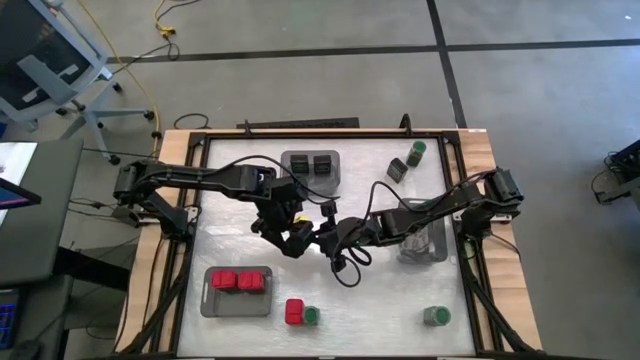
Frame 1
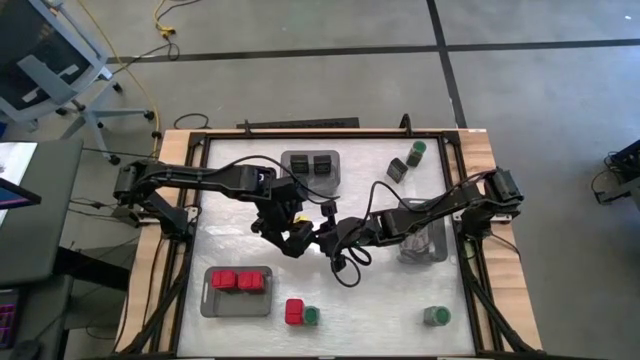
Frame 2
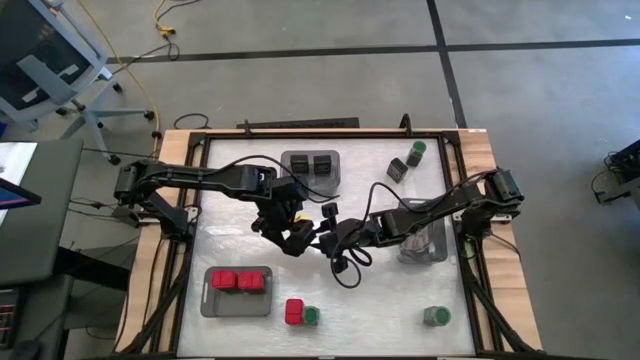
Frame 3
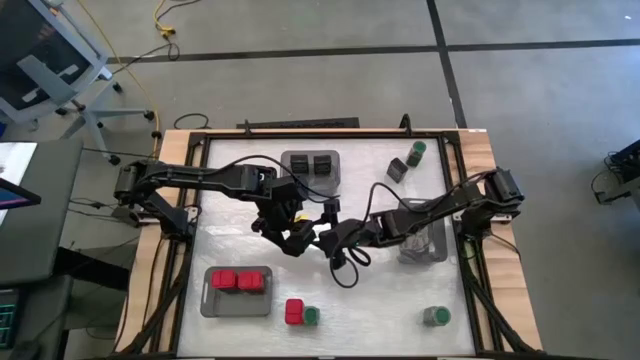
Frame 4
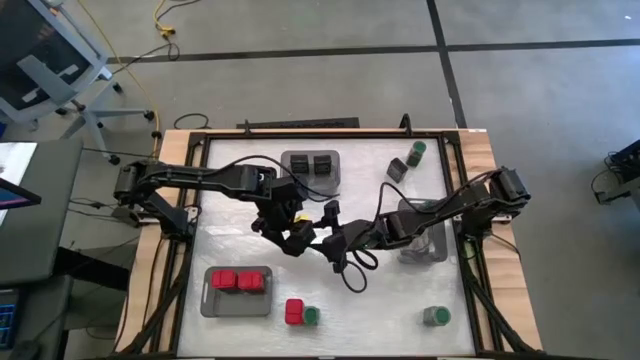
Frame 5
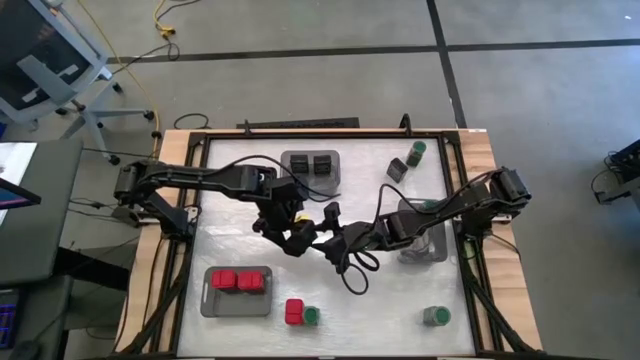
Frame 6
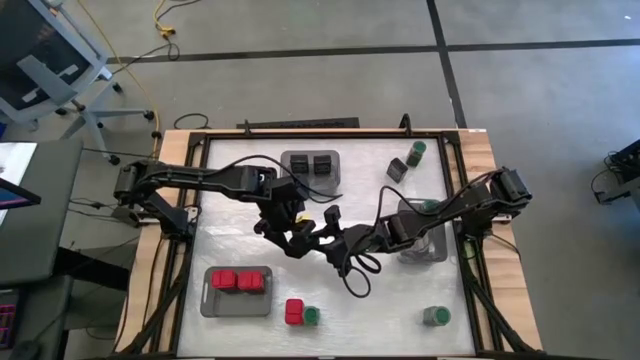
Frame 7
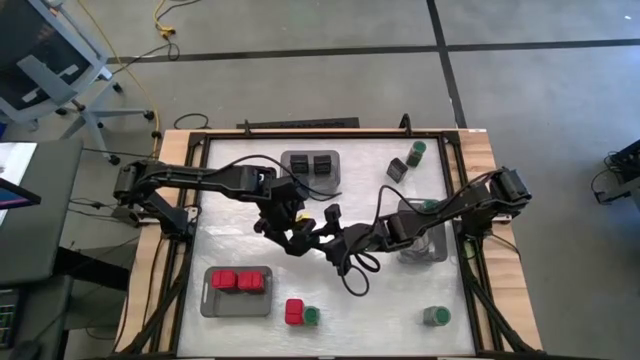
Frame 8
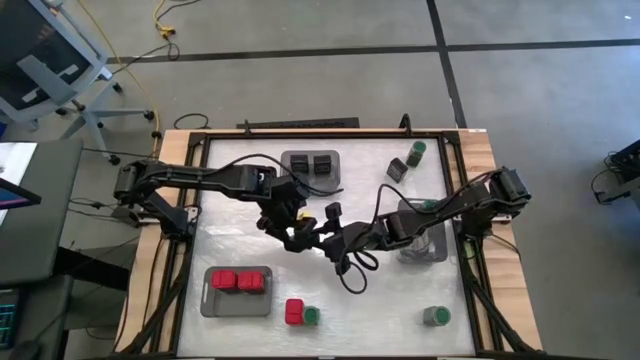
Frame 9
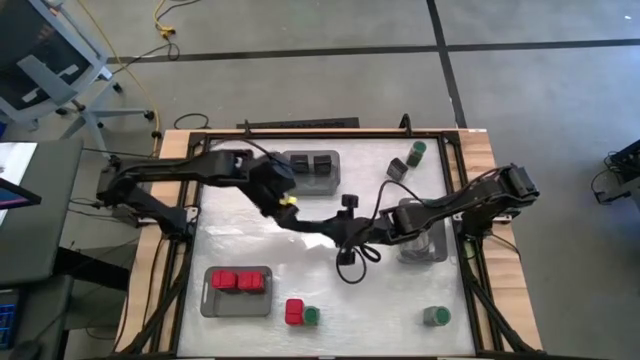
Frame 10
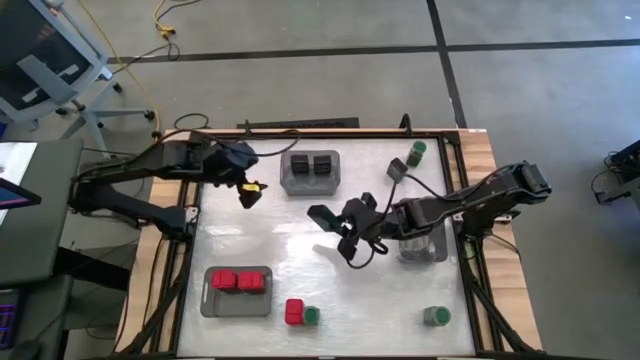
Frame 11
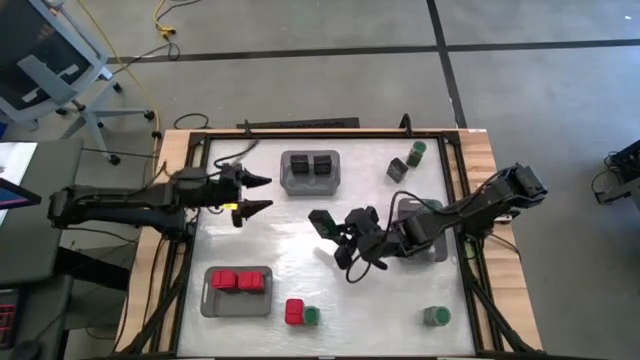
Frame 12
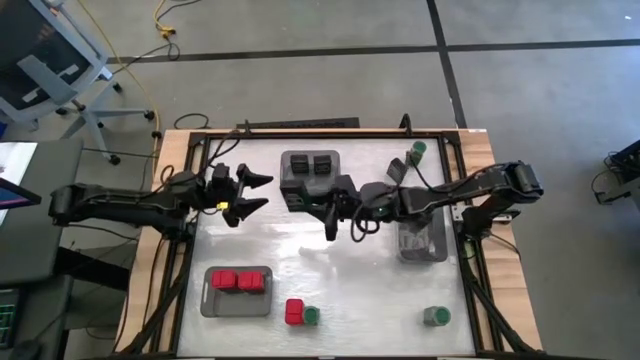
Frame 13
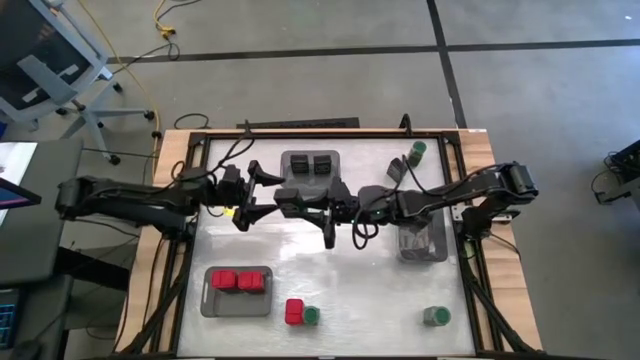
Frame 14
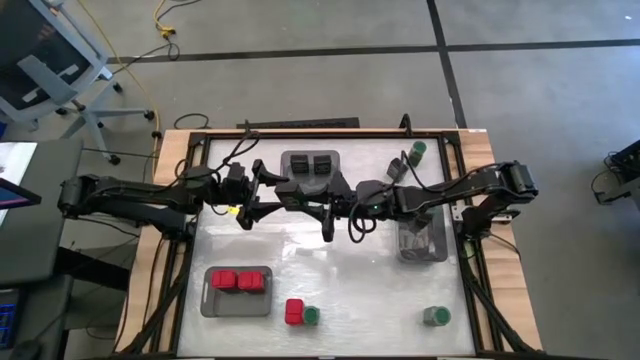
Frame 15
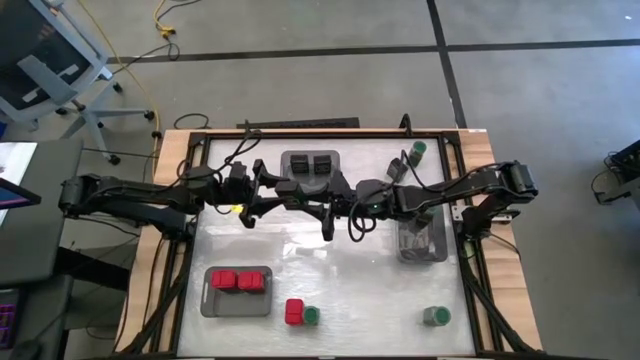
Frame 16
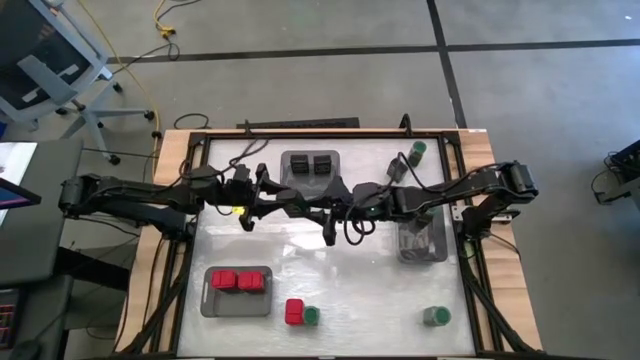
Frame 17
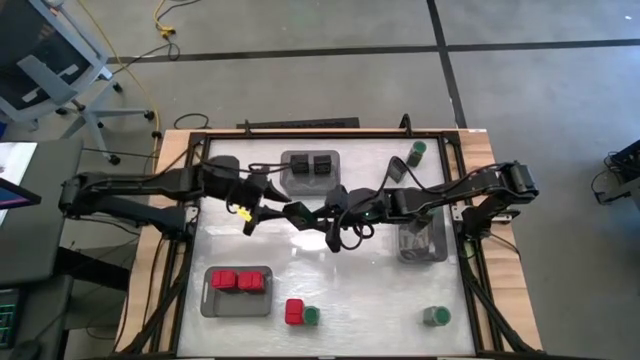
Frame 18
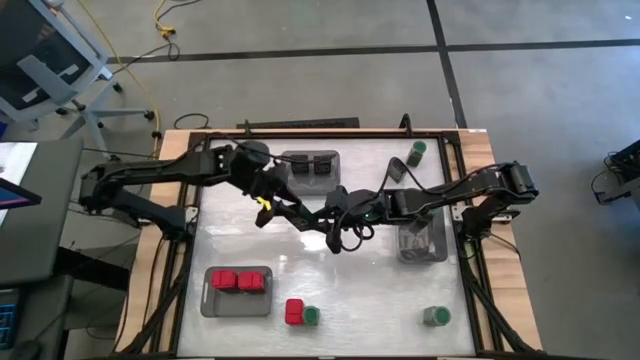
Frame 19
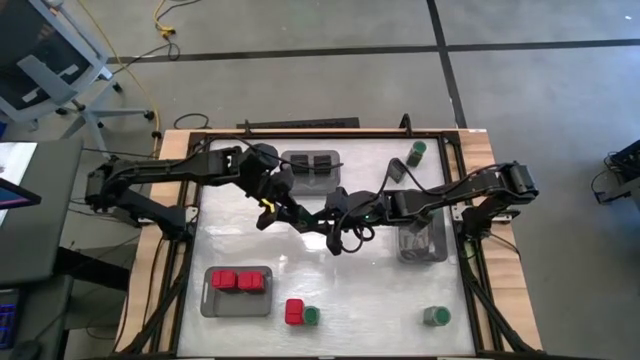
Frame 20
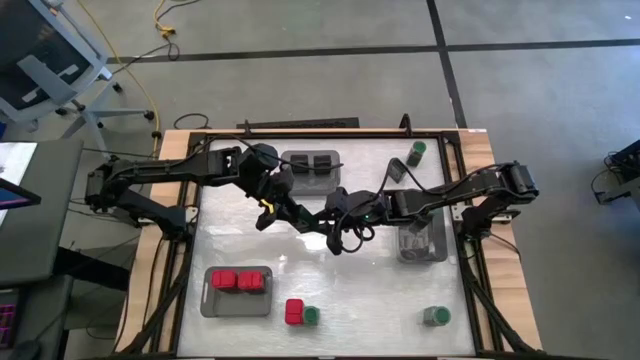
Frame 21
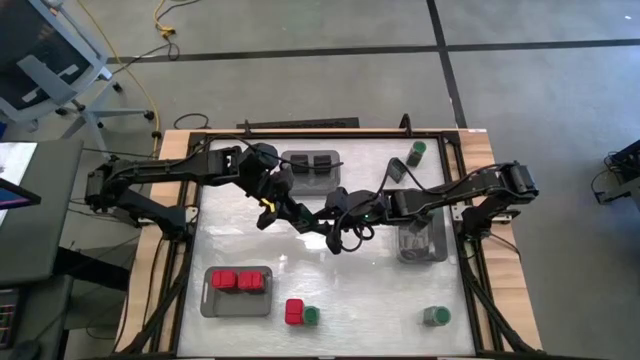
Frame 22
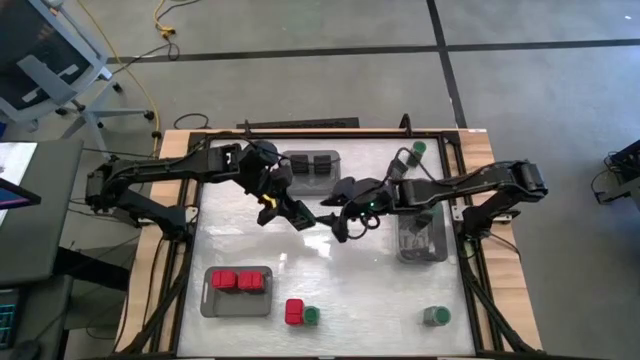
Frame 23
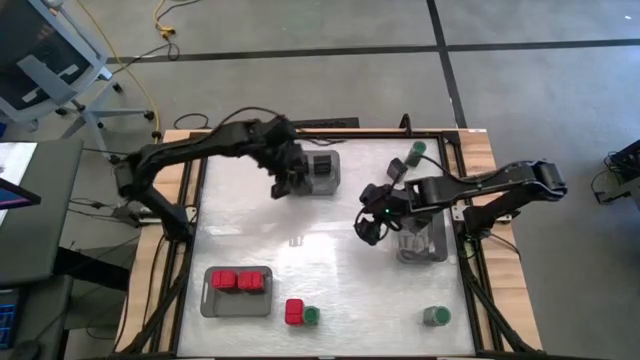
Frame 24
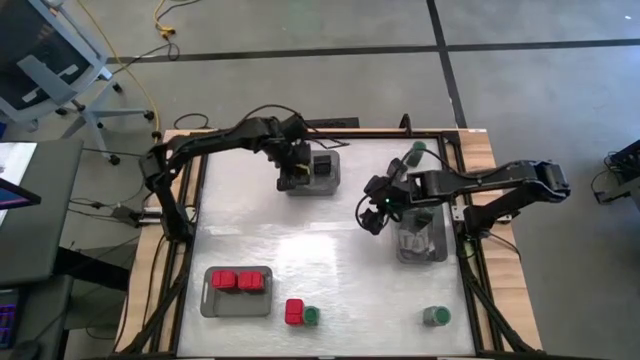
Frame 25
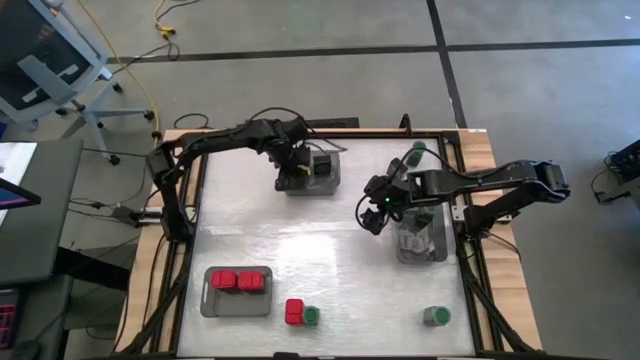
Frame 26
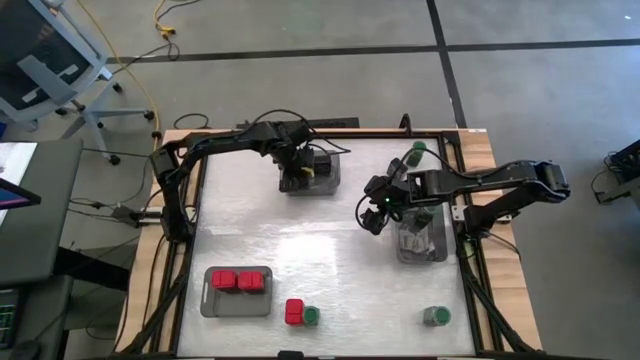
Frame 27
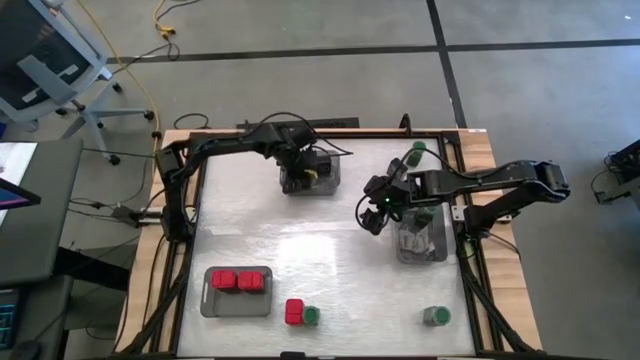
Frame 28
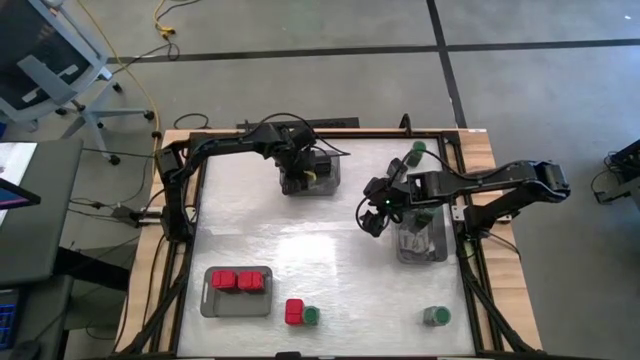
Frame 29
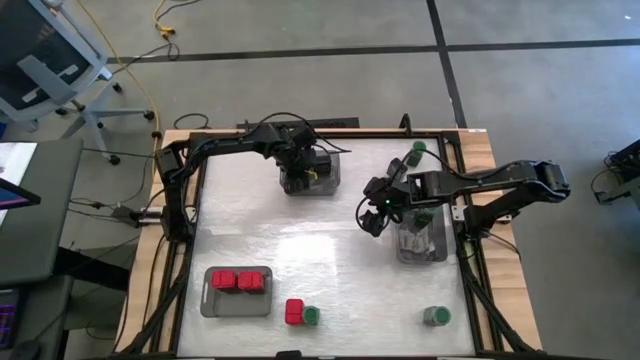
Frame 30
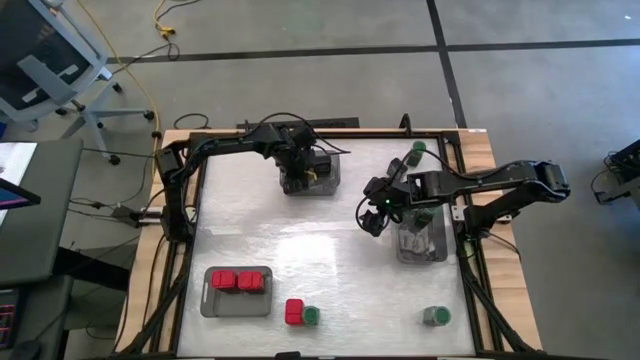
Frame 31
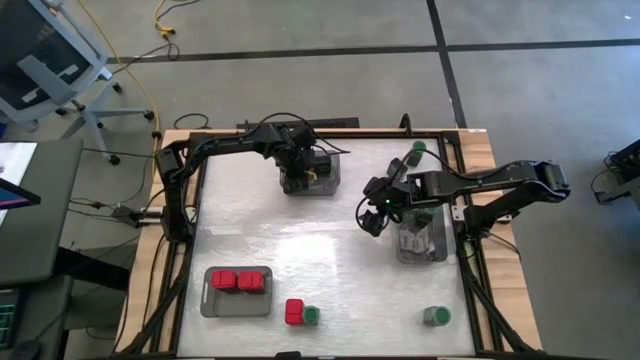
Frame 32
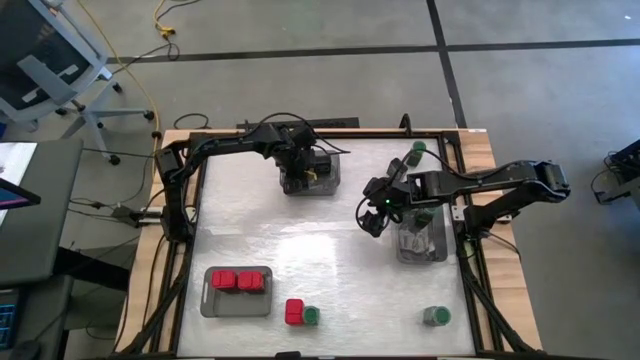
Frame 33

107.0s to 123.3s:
Task: Sort spices by type
Put the left black seasoning can into the top black transparent bin

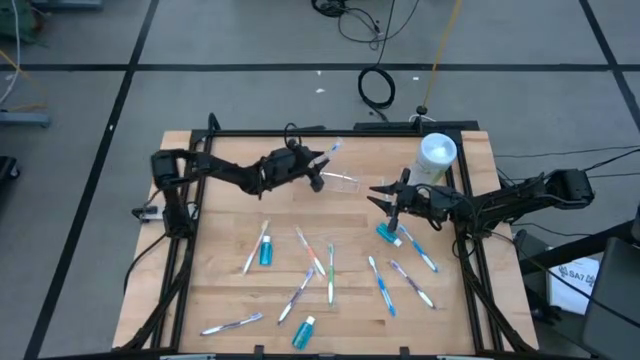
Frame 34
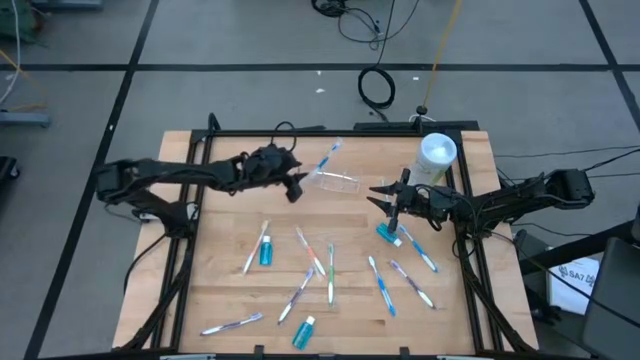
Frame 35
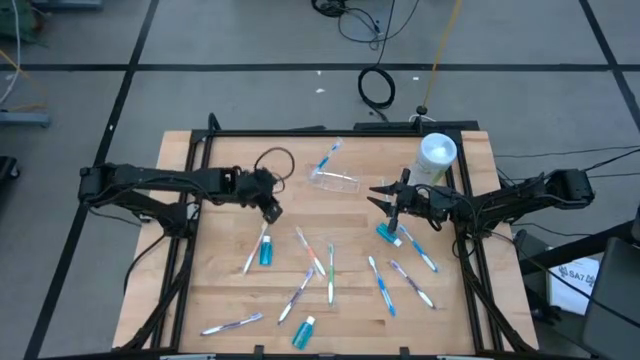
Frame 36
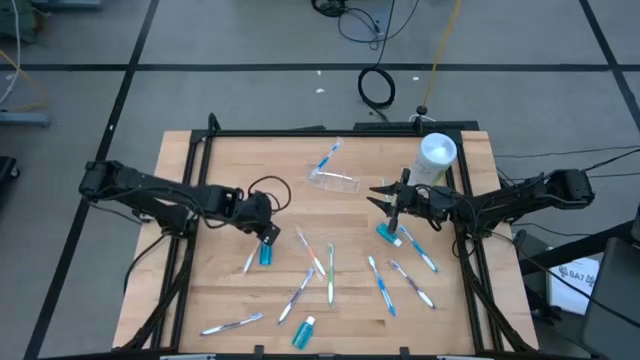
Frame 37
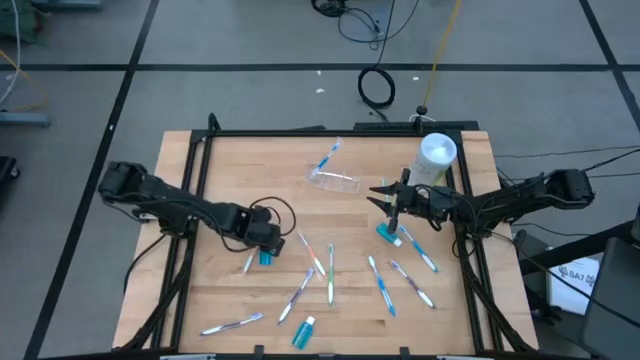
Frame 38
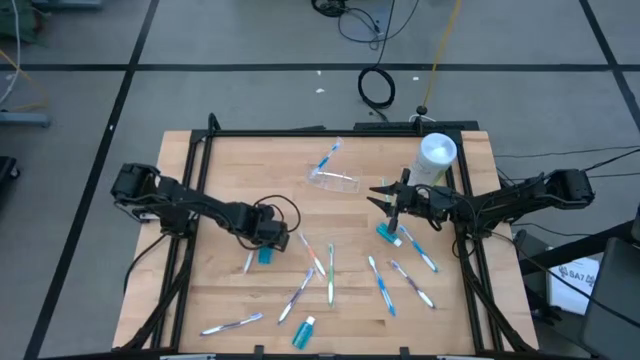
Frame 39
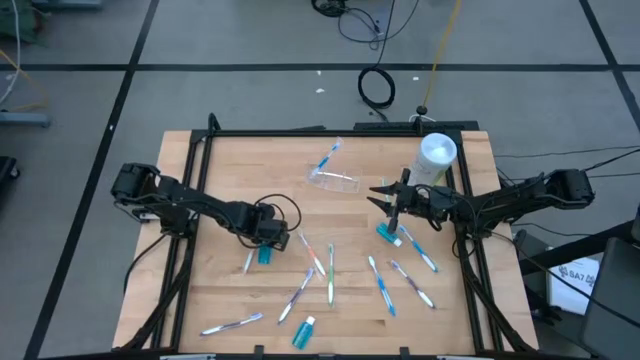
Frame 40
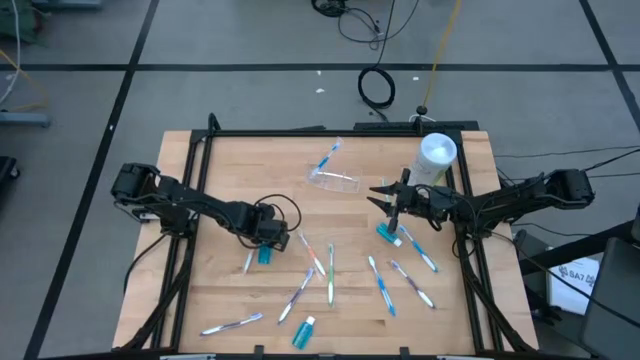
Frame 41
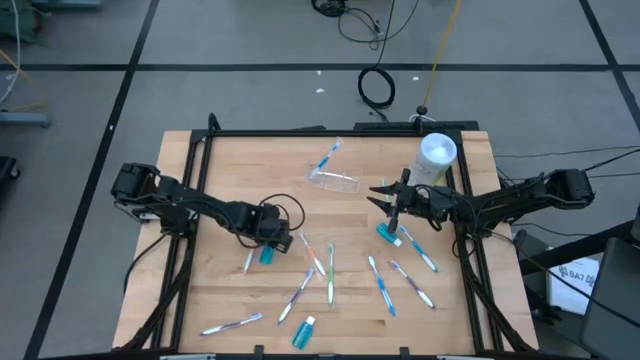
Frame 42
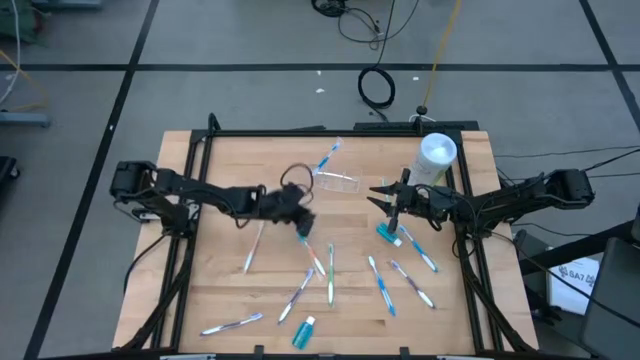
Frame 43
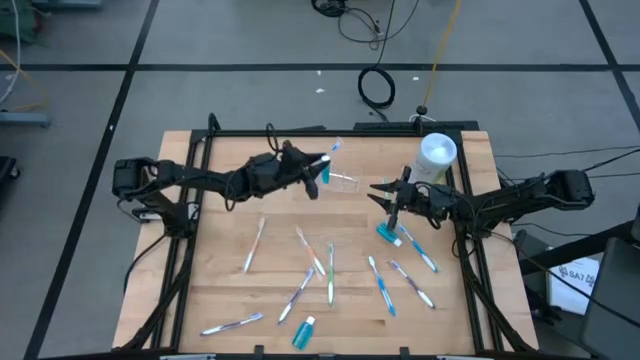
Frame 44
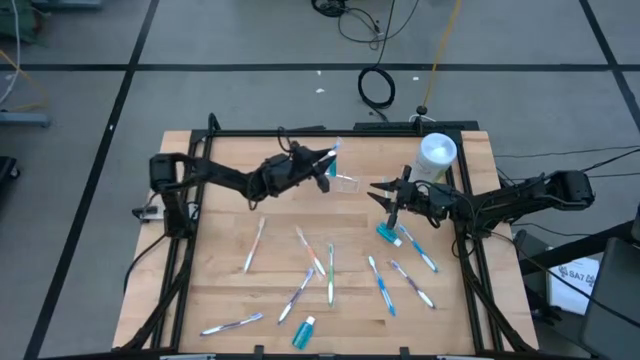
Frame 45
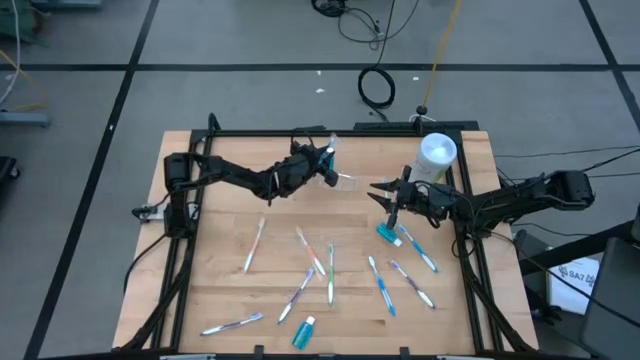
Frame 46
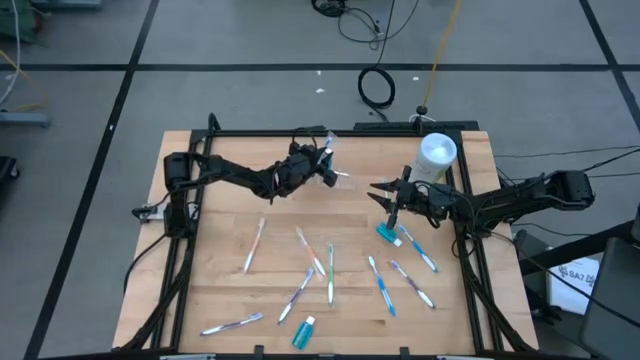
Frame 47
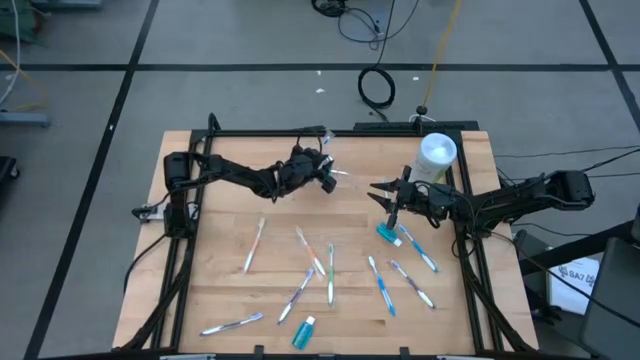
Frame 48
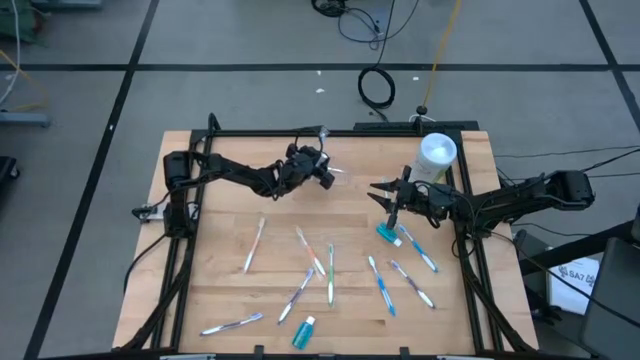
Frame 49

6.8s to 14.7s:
Task: Pick & Place toothbrushing station
Put the top left blue mouthwash into the transparent organizer
